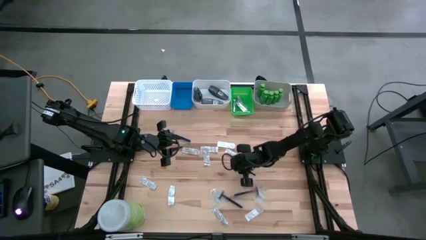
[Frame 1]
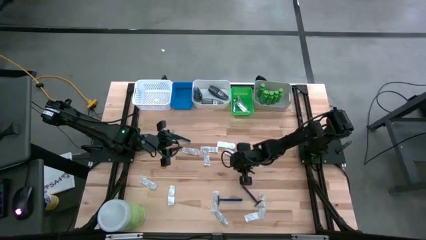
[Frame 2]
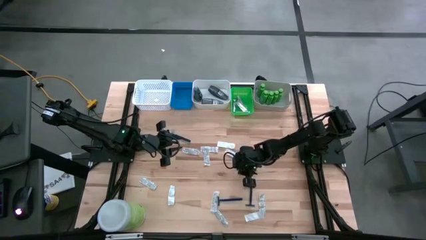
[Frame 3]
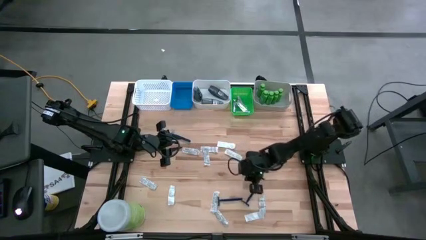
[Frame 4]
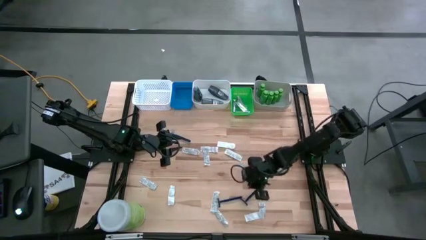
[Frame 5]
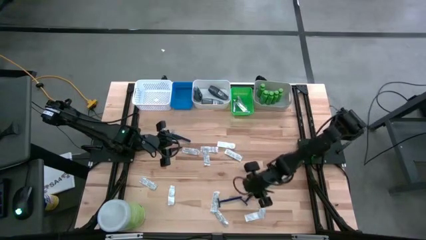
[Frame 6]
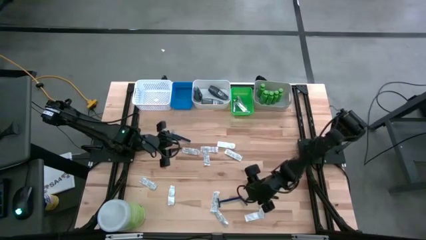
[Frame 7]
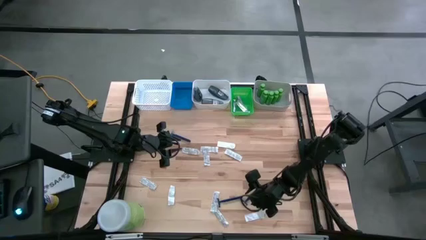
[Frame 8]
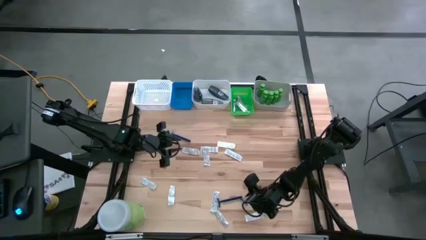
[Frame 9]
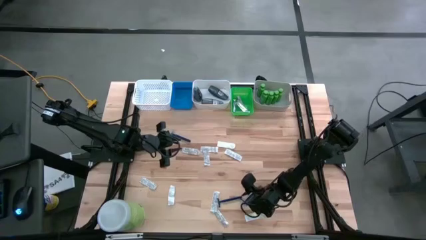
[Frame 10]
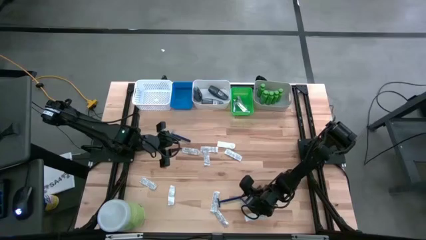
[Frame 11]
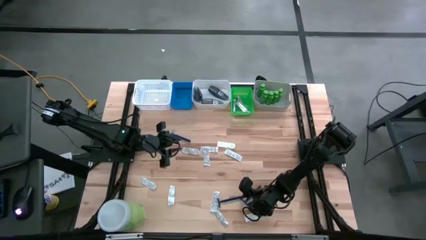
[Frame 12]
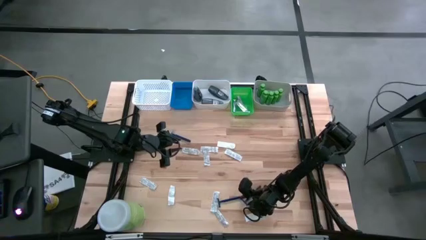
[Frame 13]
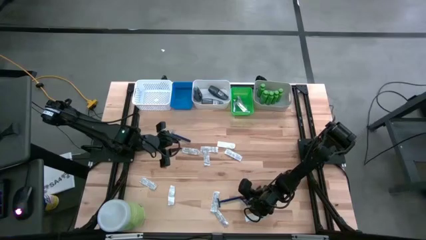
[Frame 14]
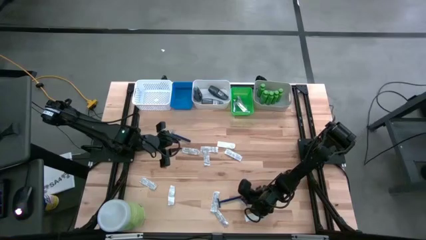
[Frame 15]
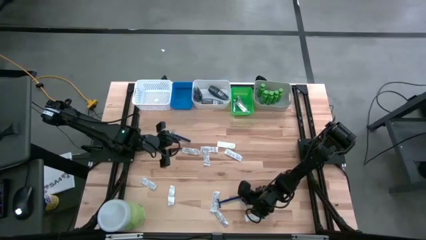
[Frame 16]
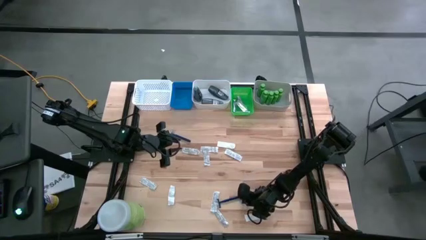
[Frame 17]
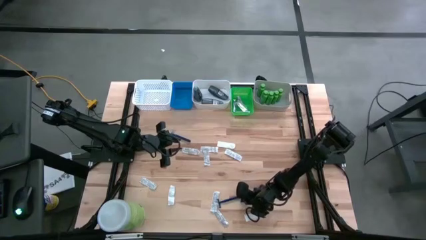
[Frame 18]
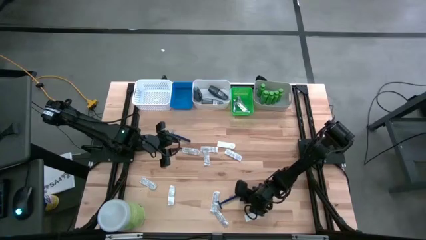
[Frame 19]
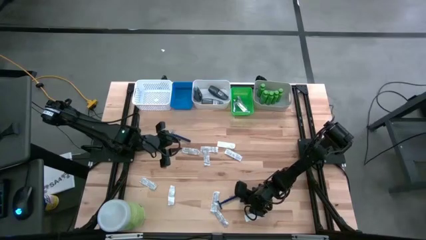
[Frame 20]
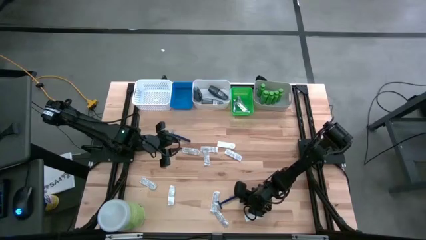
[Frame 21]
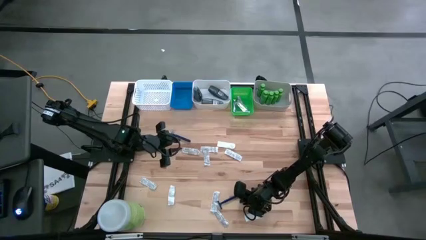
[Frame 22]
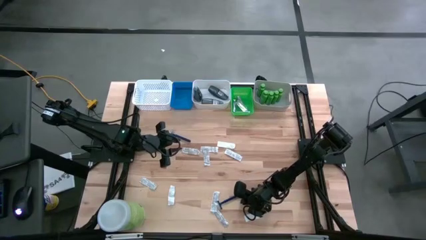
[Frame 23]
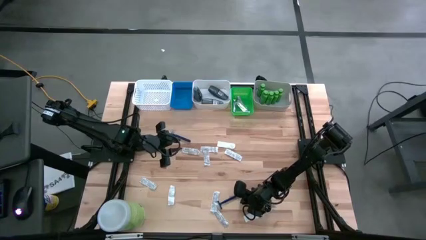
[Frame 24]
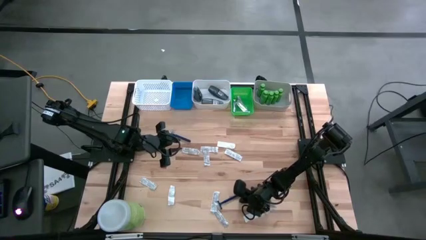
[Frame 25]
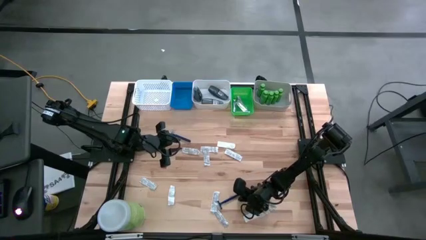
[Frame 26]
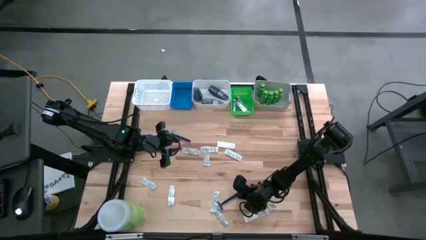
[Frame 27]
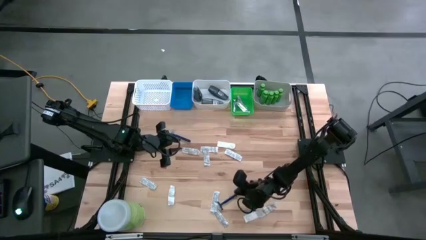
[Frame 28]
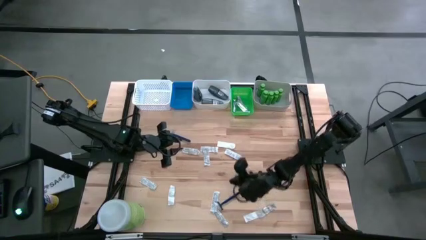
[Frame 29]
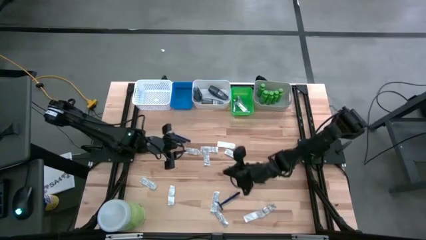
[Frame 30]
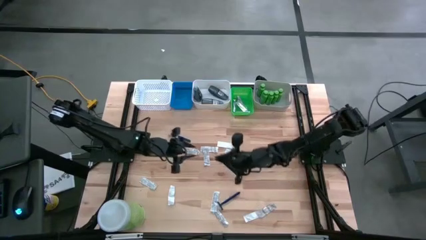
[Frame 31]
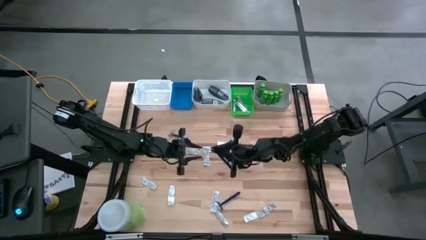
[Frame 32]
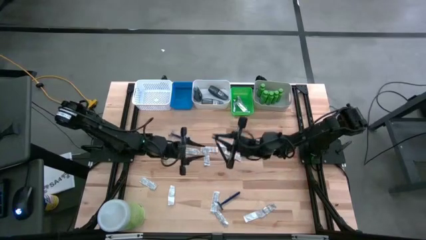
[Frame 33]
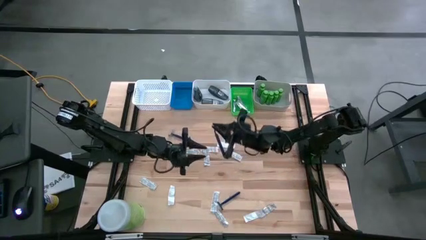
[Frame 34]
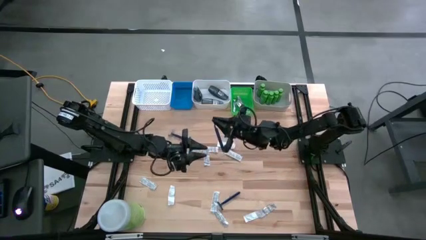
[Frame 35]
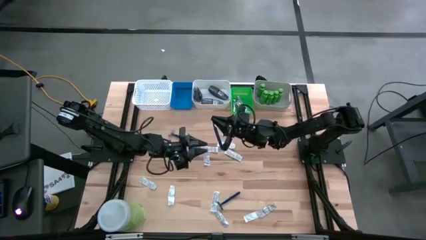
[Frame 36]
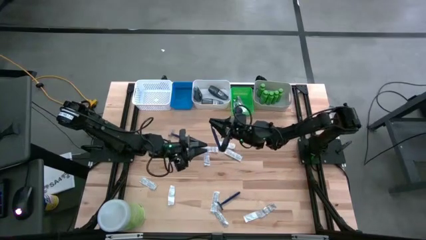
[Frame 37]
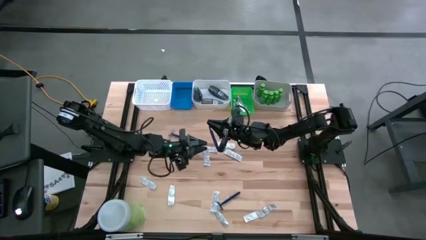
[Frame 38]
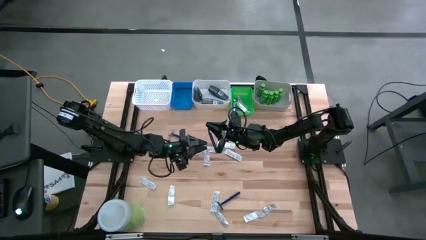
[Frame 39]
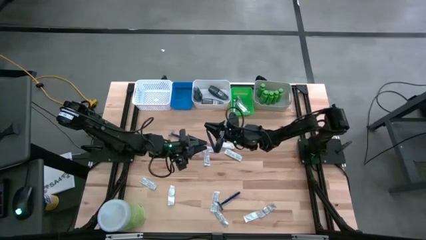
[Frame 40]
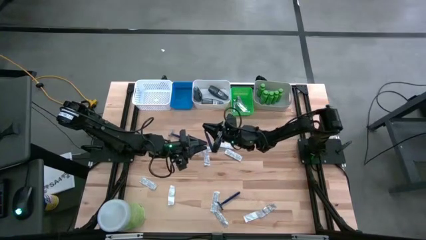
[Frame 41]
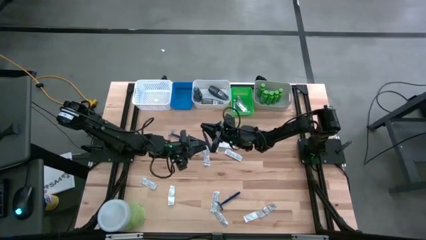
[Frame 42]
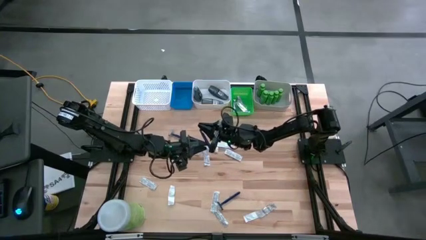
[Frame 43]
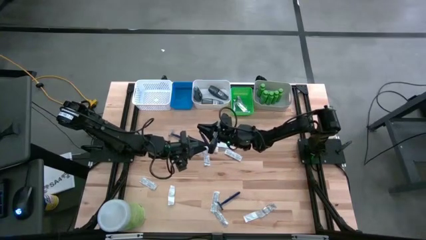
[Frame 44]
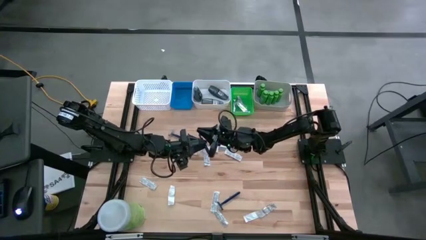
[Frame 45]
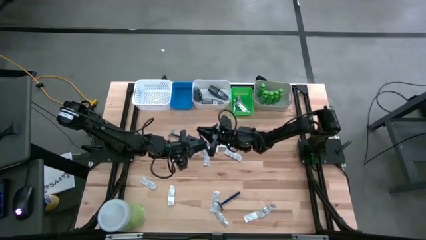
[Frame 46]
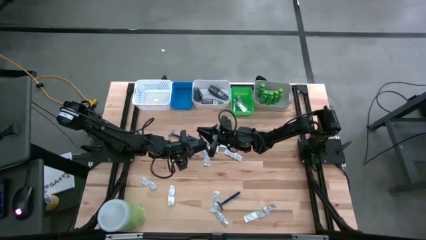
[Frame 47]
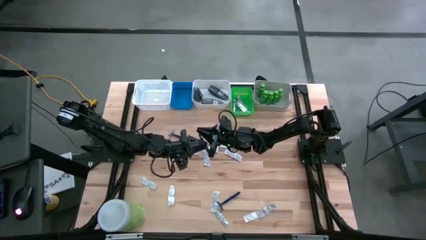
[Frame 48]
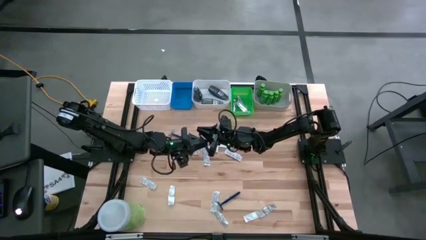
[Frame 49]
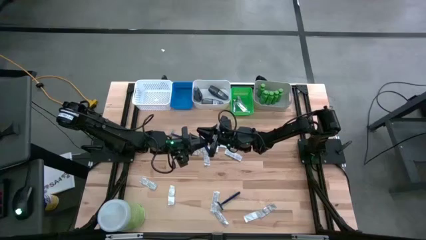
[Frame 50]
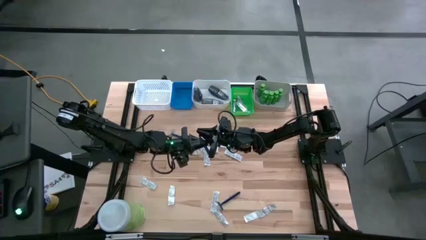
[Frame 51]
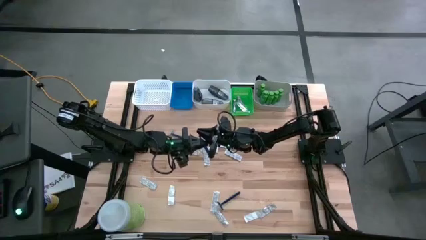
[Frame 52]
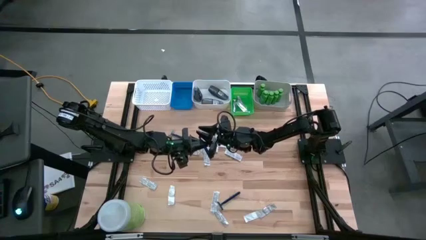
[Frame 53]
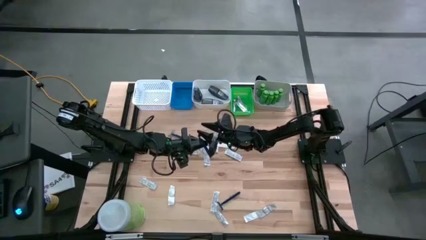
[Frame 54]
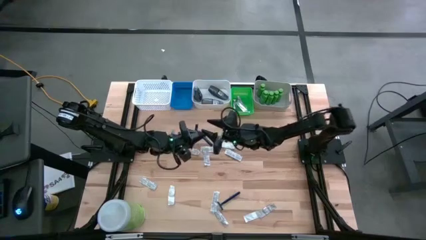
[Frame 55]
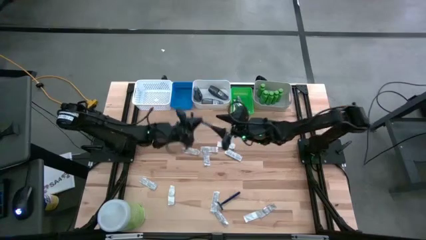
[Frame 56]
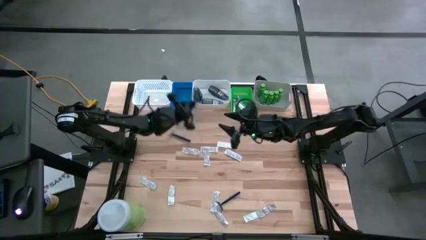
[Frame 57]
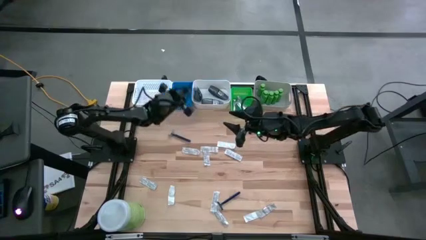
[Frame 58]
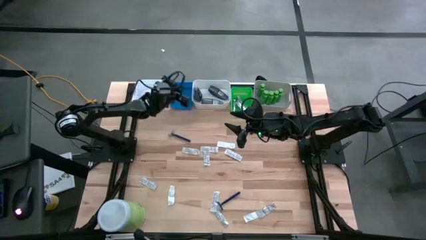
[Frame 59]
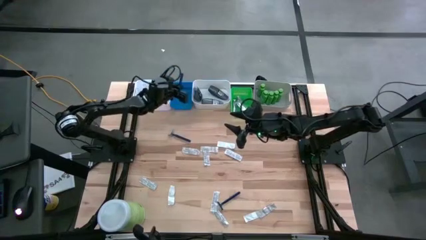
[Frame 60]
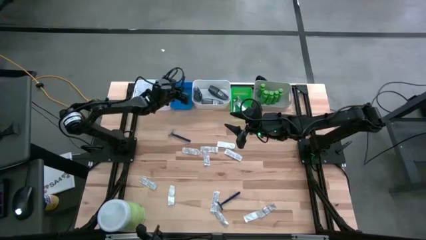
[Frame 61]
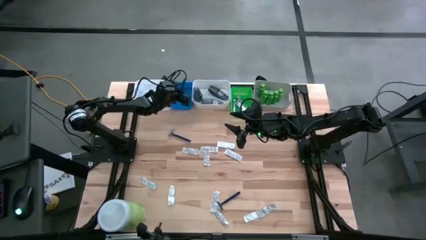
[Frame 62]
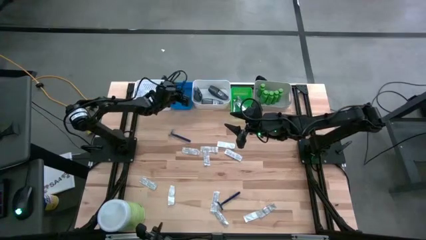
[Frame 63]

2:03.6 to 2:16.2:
Task: Pick & Place Travel size toiletries
Put the razor into the blue bin

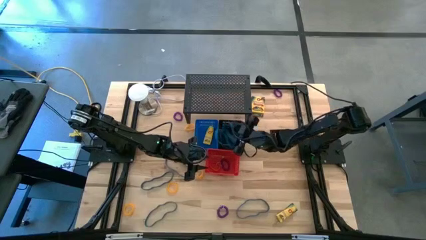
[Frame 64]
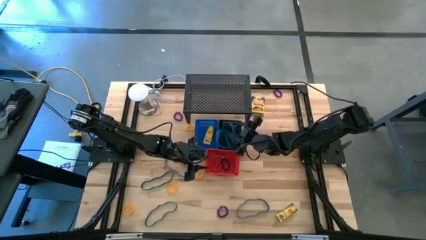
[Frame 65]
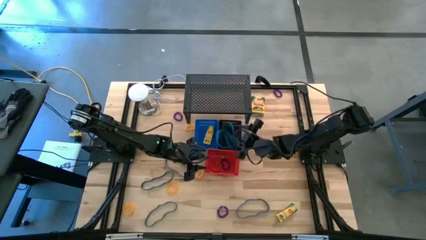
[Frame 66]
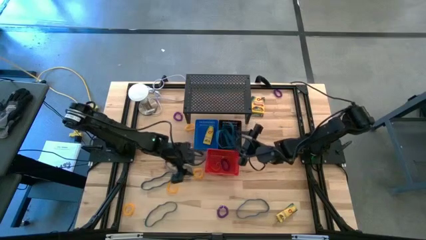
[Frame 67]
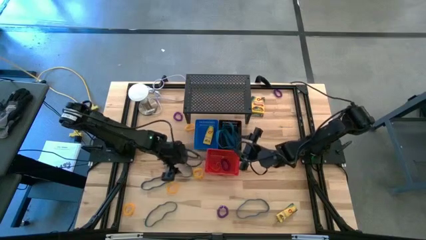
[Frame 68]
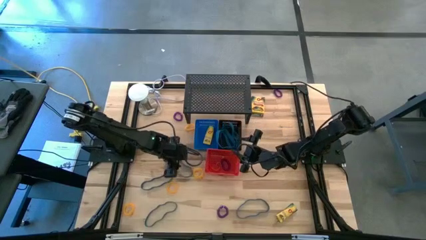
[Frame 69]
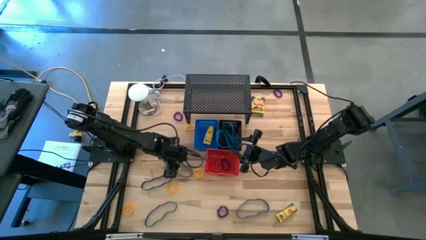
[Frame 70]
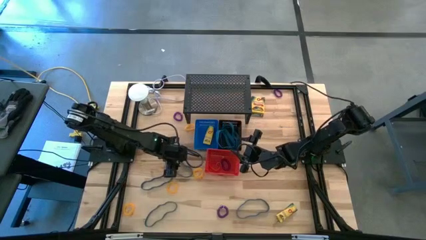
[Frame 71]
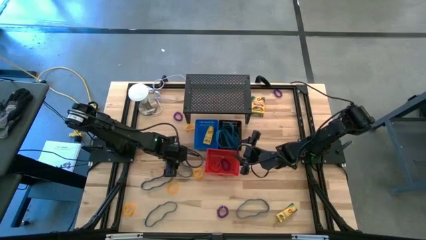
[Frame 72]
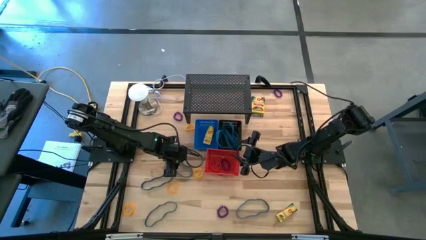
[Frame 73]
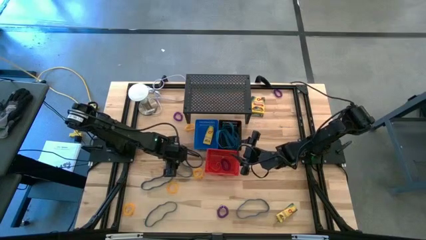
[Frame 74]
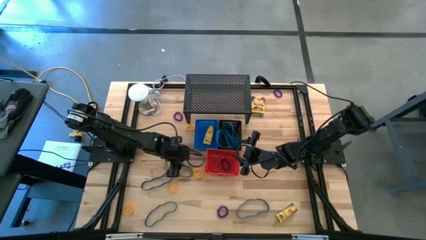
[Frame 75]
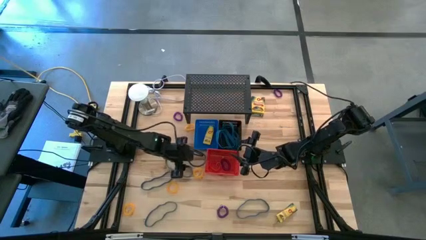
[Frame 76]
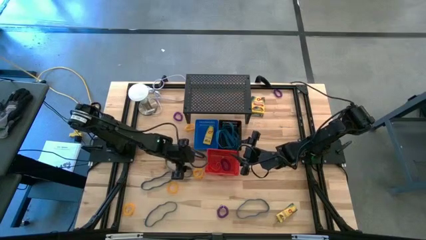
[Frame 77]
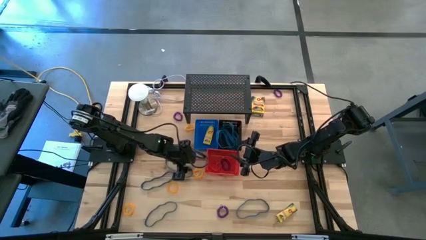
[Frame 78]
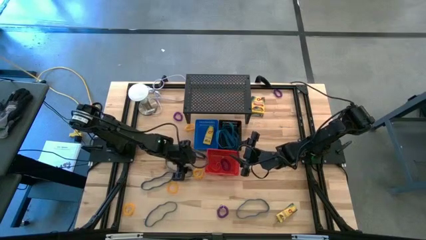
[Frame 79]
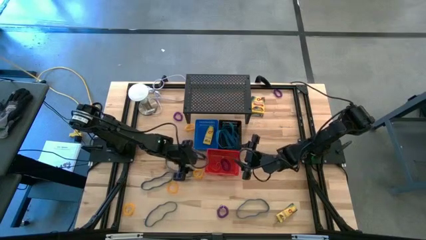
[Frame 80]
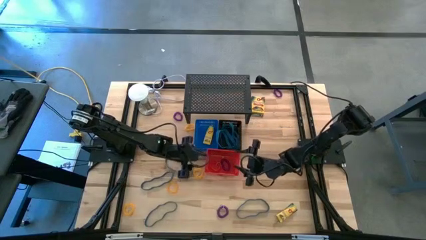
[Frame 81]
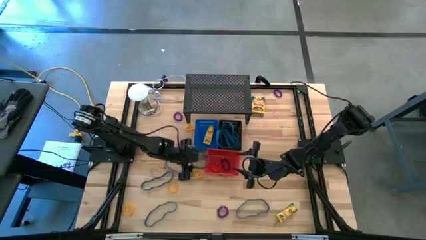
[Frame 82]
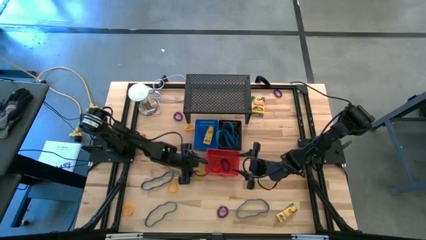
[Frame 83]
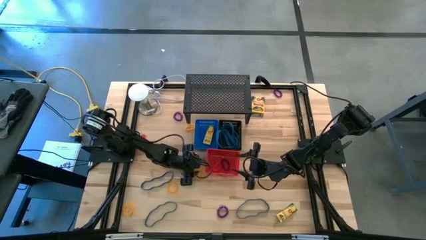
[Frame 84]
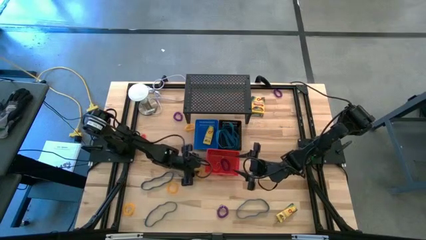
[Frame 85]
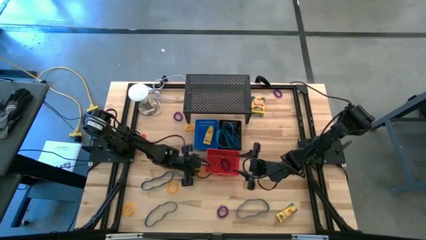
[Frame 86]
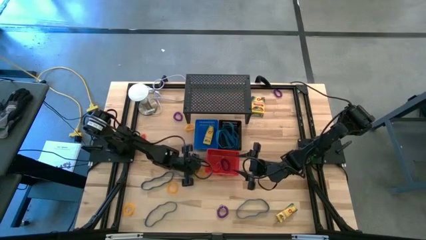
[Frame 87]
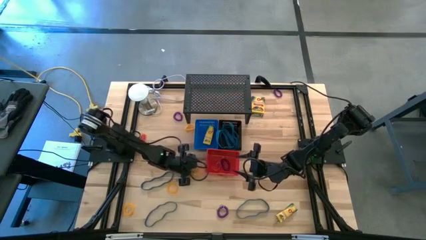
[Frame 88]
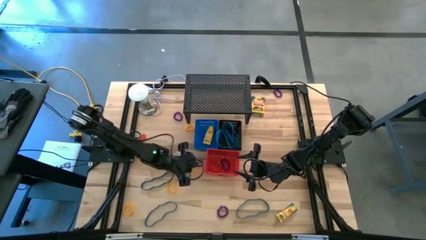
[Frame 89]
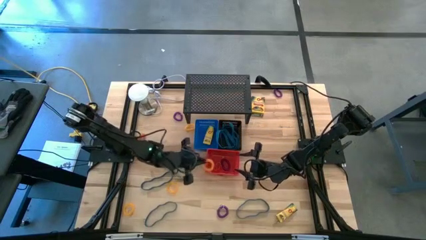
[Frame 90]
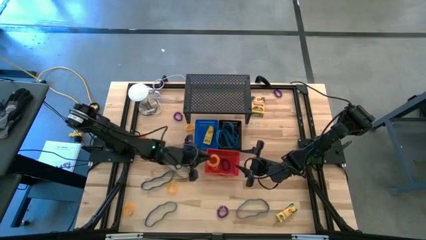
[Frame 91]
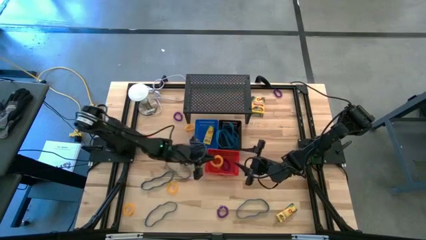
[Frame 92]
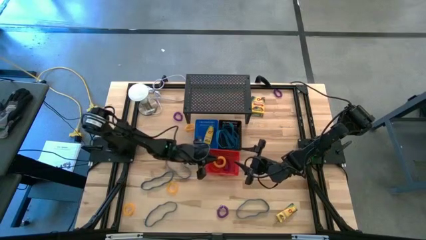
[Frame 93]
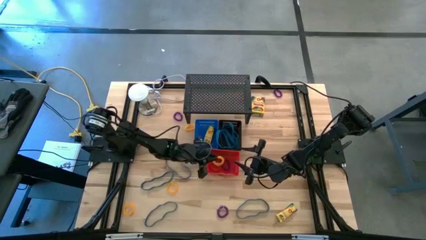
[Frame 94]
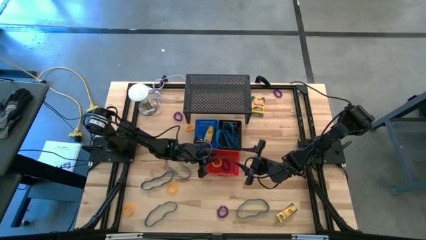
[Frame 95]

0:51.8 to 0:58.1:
Task: Pick & Place Office Desk Supplies
Put the yellow spring keychain into the red bin
